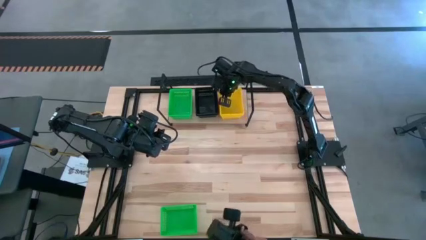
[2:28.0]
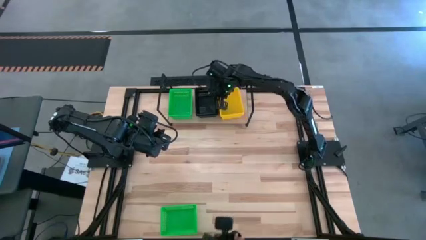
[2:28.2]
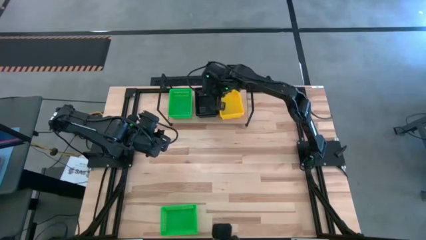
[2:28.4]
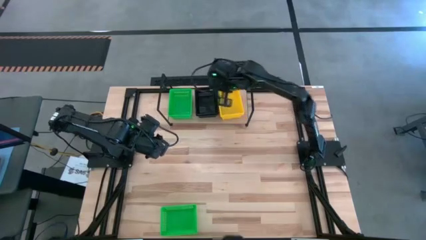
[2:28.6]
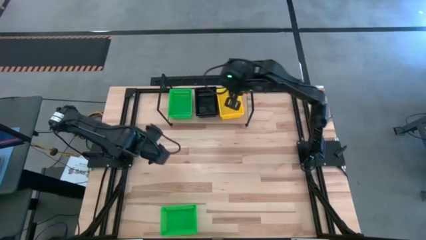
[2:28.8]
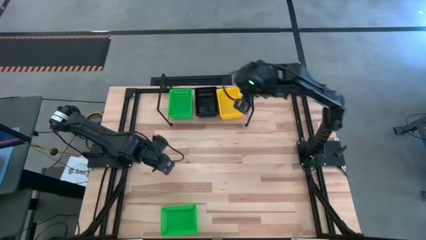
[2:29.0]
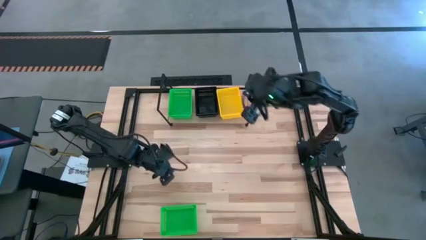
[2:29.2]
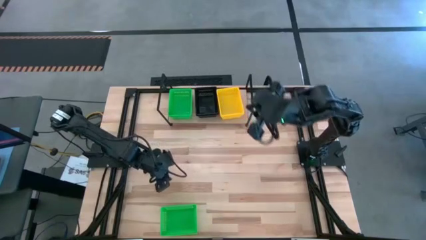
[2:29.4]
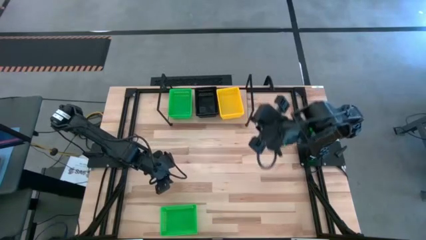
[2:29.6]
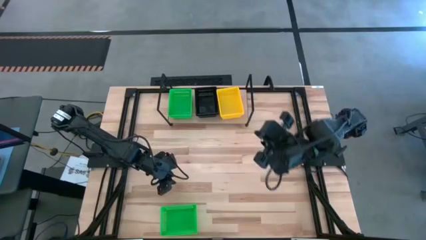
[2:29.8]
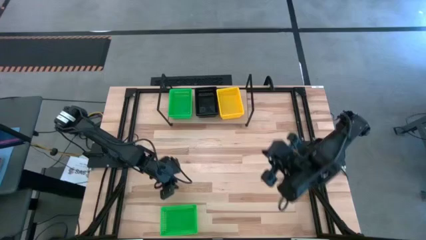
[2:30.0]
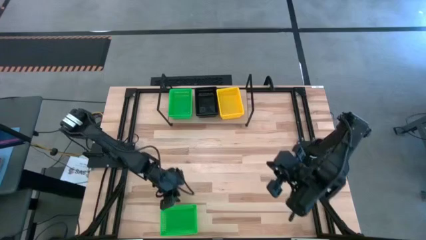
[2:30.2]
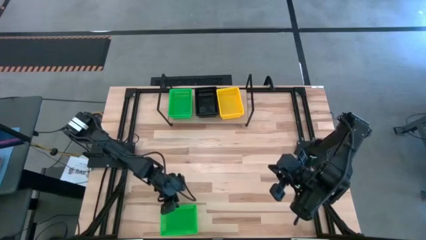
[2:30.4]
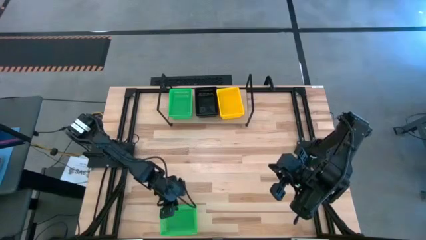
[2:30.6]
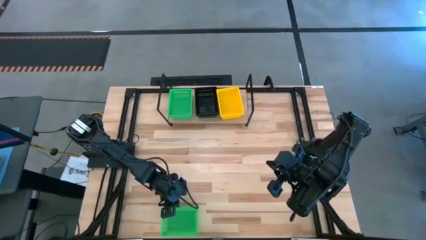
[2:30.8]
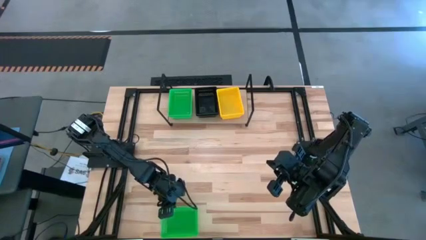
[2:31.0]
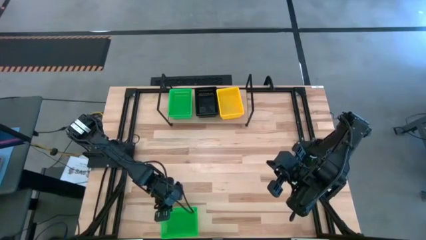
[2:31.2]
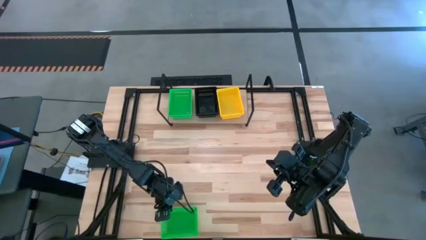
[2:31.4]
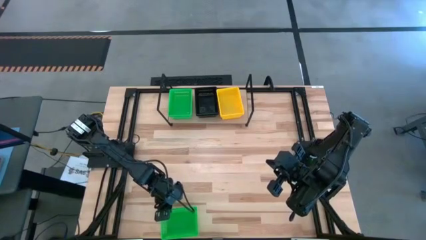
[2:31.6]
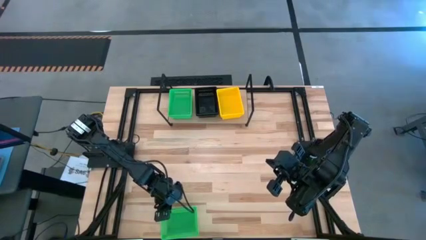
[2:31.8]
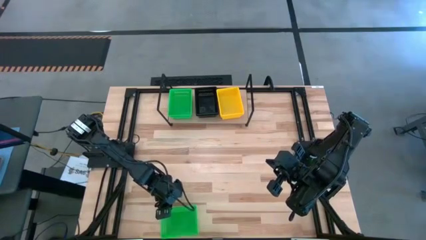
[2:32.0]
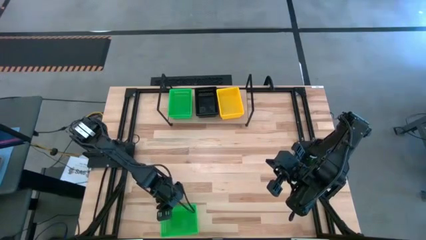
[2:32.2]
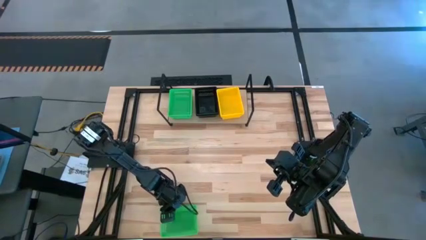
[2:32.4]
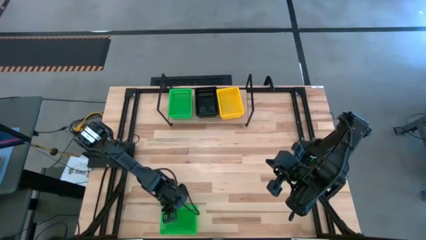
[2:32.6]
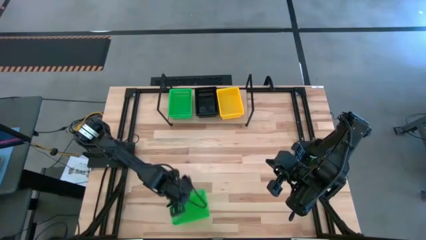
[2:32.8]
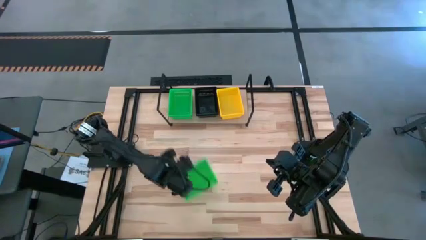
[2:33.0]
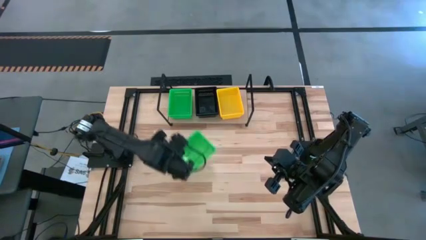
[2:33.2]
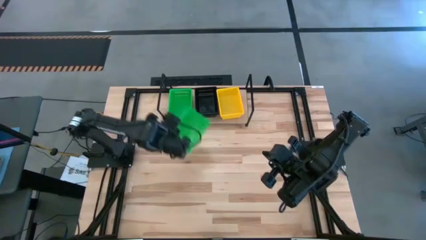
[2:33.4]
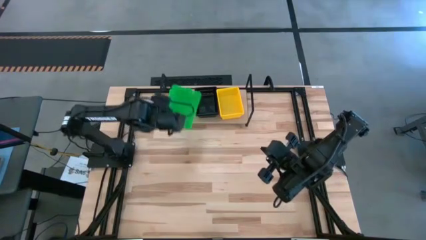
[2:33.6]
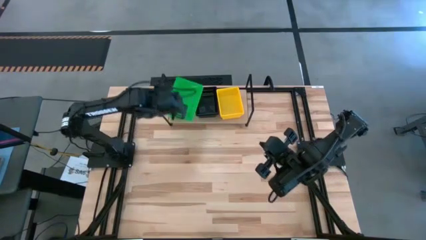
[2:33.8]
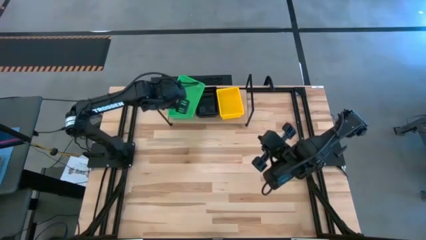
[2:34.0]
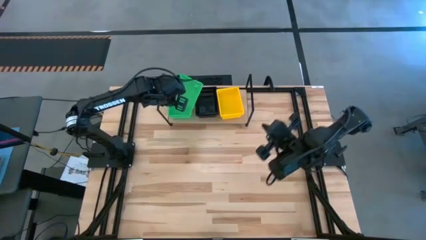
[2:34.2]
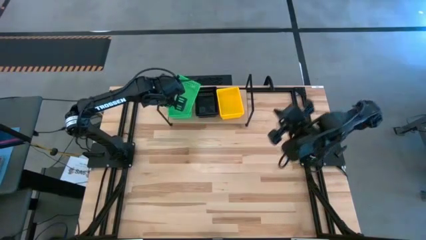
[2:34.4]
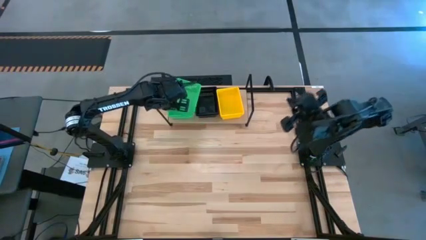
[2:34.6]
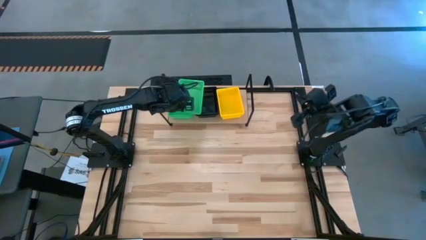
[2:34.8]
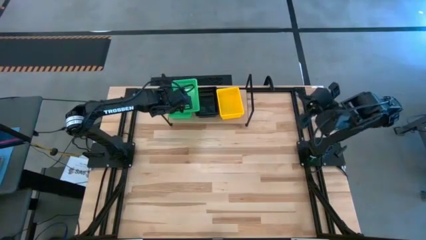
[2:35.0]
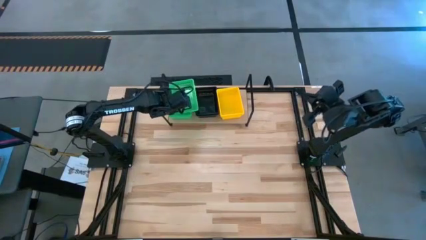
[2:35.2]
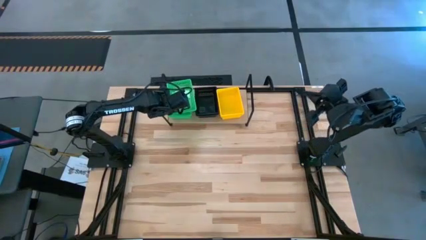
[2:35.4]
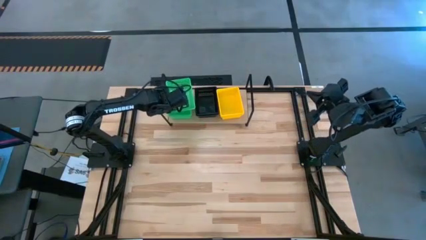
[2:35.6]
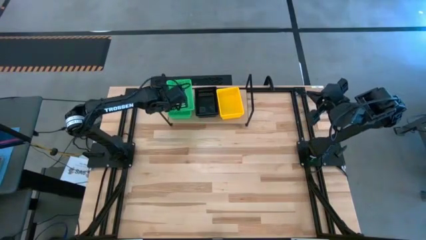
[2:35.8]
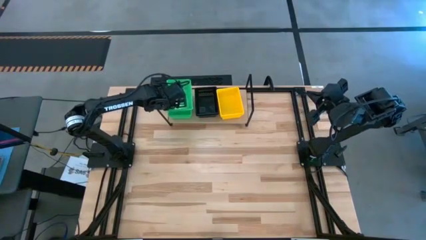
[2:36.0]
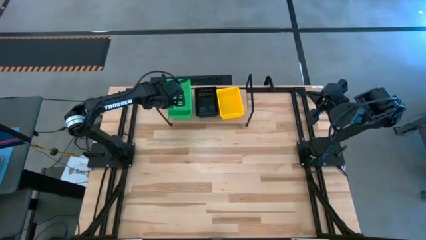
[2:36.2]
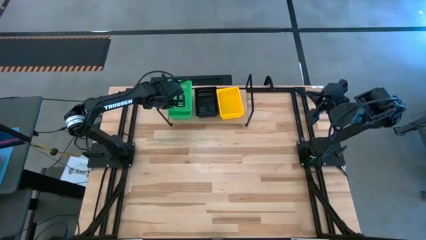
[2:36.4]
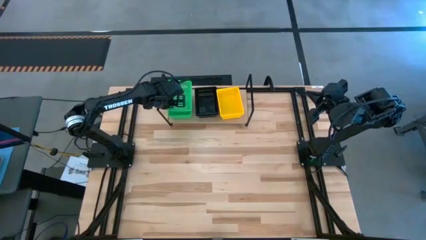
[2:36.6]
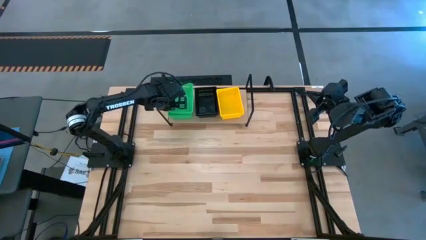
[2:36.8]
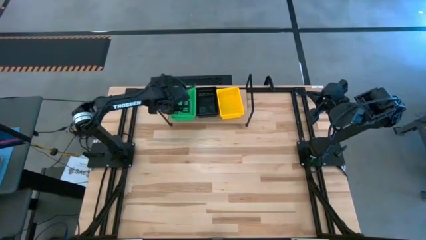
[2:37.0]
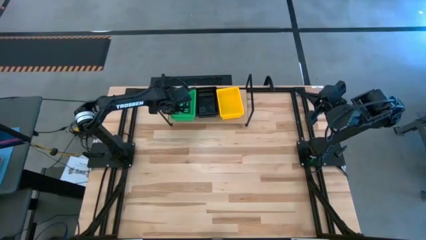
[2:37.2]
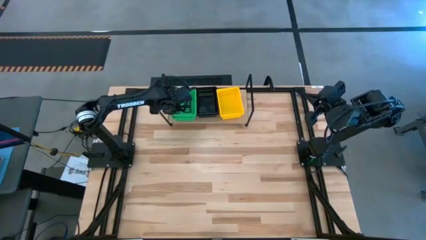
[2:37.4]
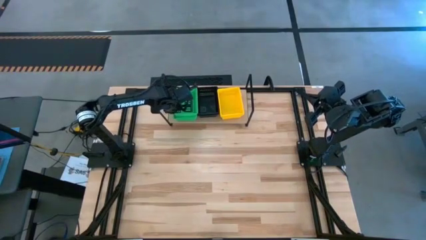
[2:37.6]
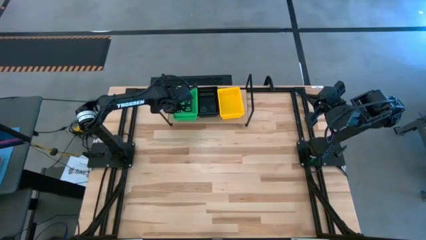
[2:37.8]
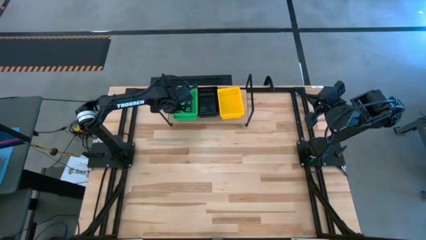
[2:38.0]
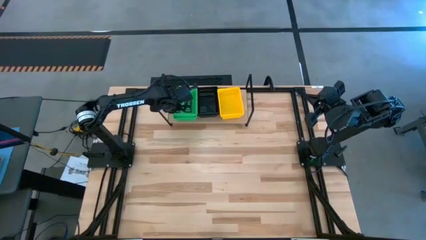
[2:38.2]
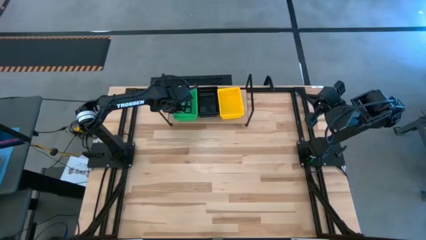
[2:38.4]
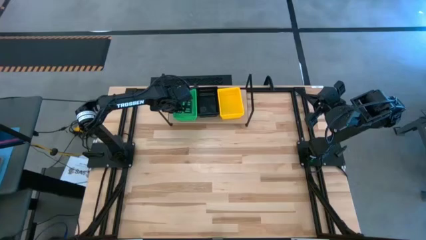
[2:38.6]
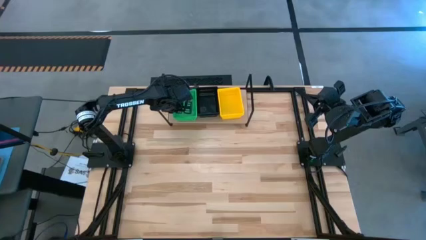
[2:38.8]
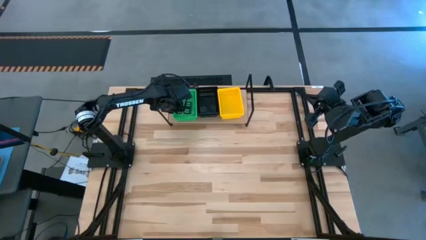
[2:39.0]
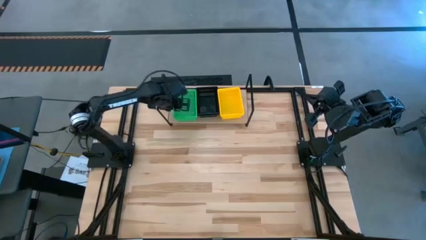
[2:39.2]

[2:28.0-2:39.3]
Task: Stack baskets on shelf by color
Stack the green basket on top of the green basket on the shelf

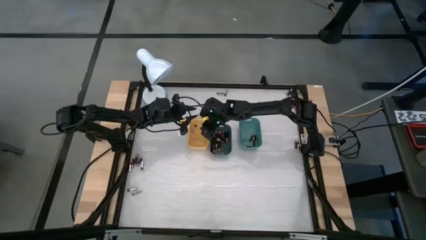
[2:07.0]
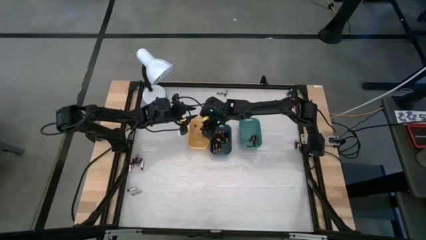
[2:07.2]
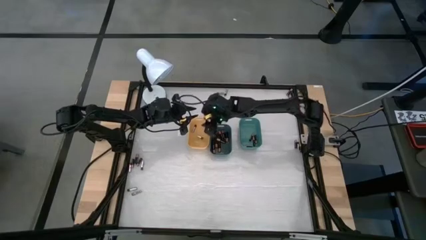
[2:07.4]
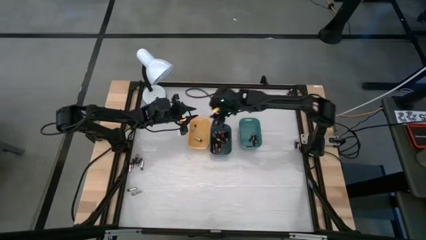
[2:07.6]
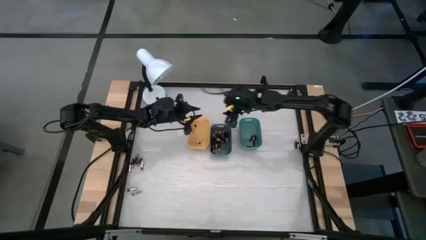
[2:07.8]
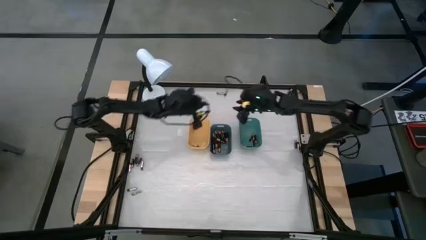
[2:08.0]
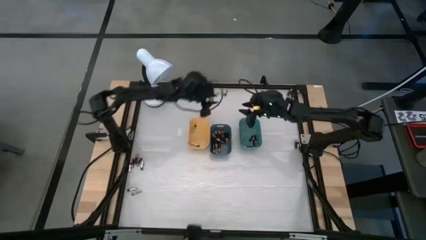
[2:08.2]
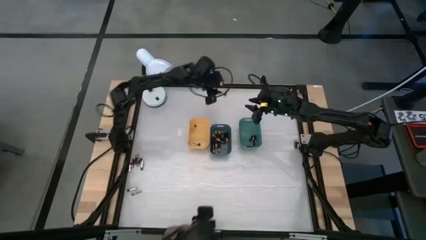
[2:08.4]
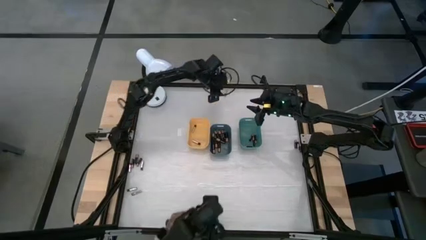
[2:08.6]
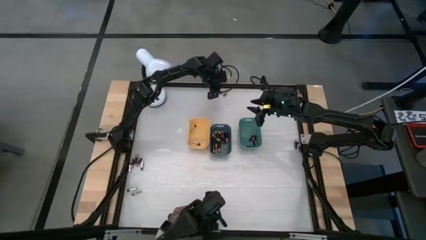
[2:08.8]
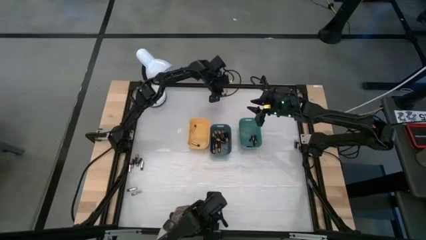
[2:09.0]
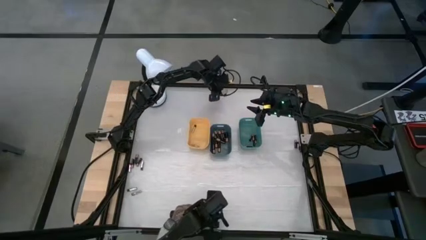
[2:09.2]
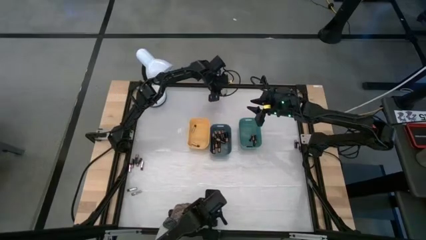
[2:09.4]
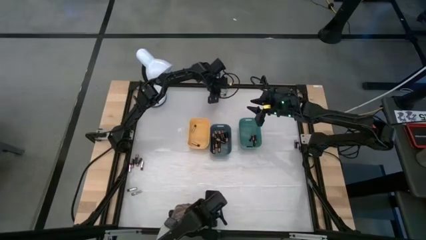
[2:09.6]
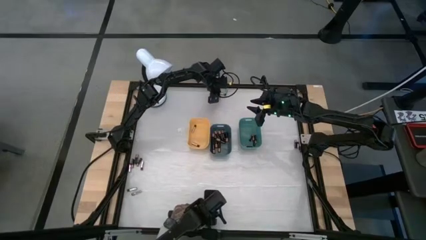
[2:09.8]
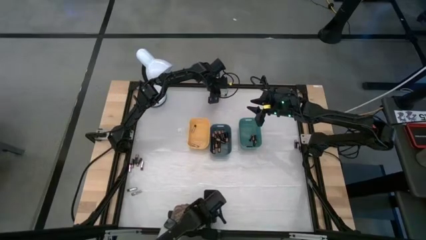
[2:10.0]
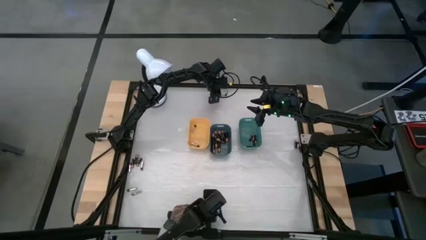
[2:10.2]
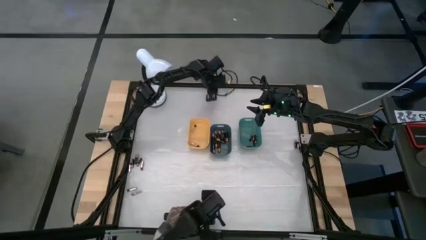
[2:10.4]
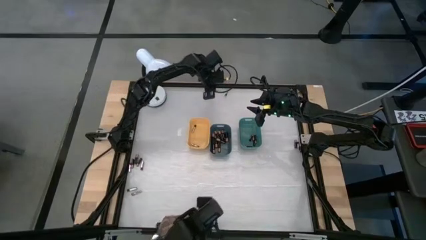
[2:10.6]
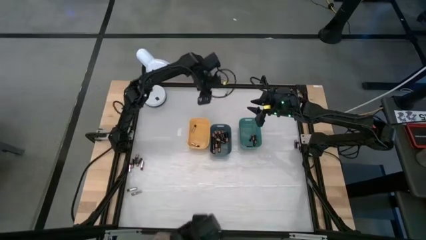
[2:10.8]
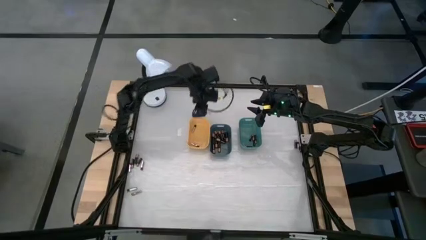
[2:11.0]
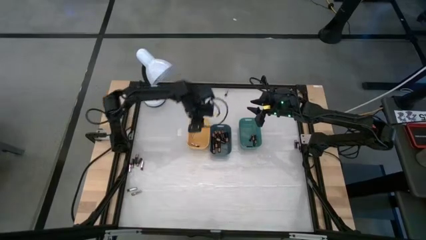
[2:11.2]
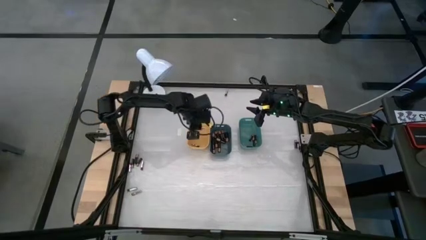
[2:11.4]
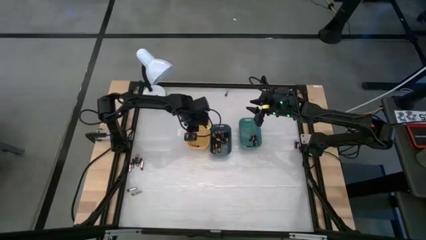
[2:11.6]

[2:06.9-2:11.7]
Task: Sort batteries
Put the silver battery into the yellow bin
